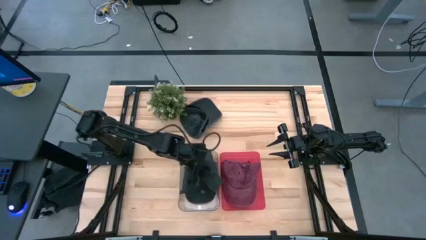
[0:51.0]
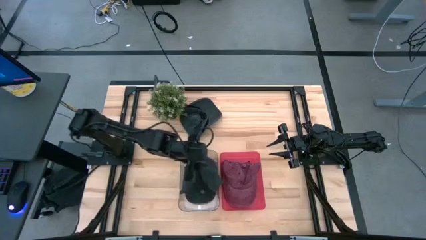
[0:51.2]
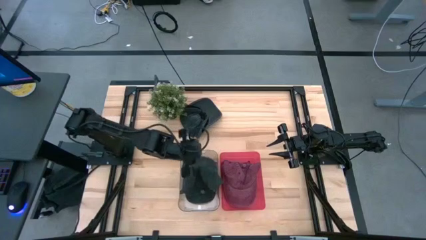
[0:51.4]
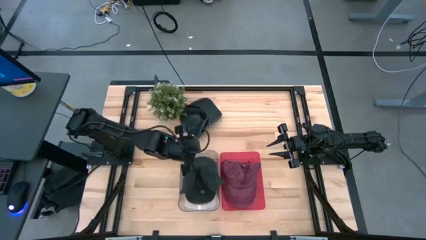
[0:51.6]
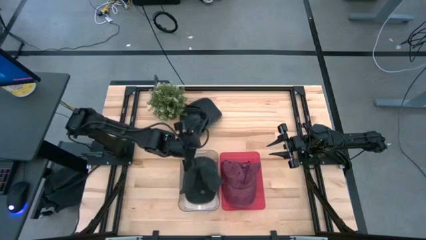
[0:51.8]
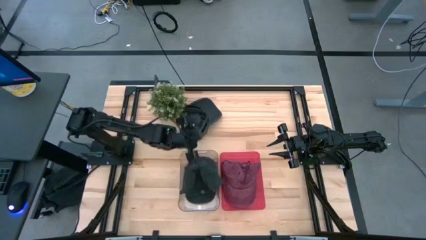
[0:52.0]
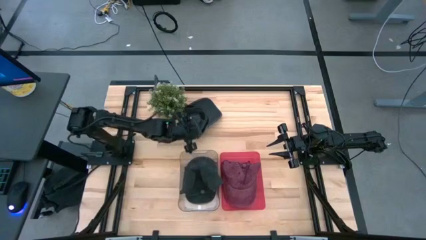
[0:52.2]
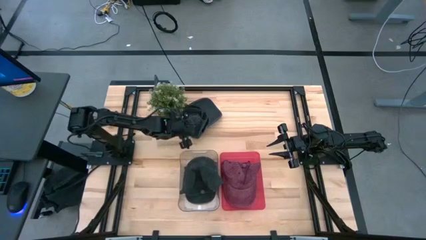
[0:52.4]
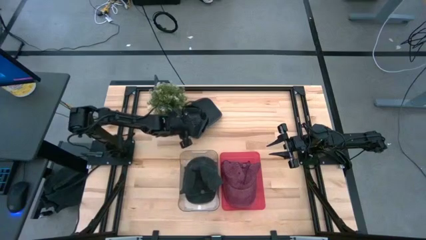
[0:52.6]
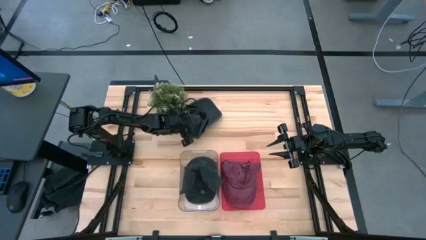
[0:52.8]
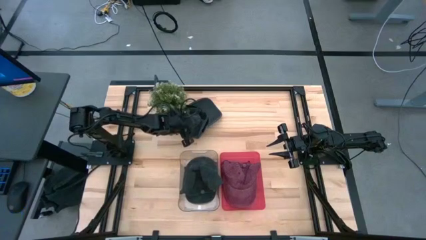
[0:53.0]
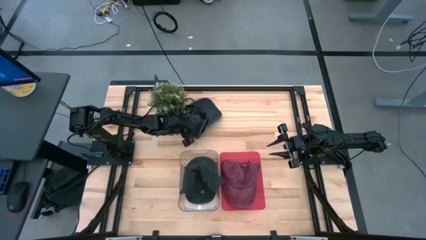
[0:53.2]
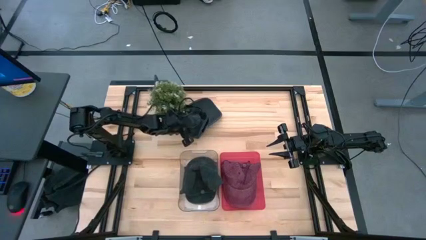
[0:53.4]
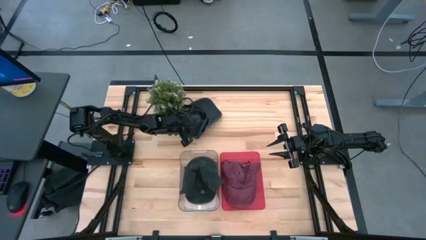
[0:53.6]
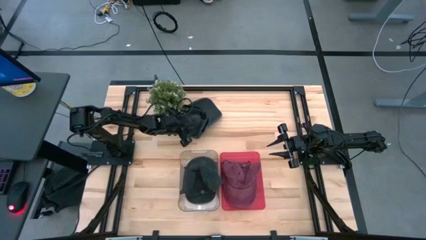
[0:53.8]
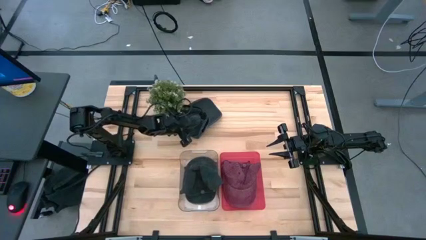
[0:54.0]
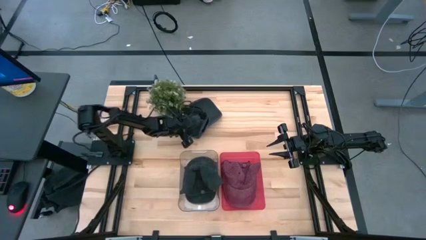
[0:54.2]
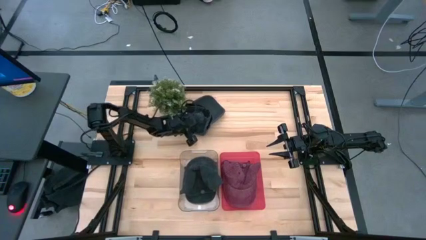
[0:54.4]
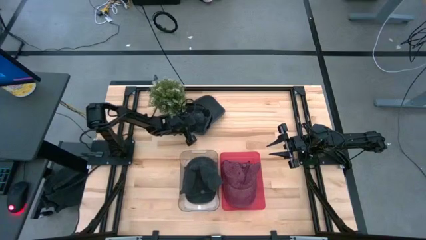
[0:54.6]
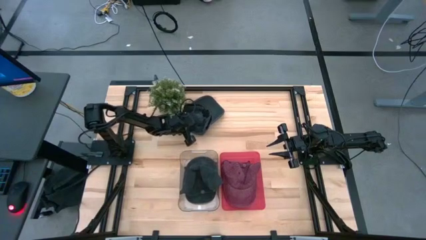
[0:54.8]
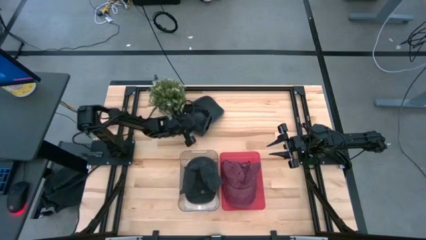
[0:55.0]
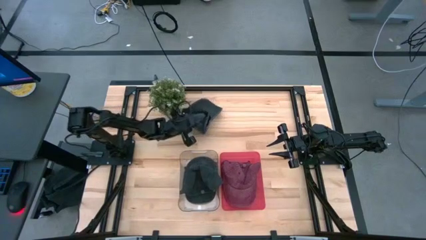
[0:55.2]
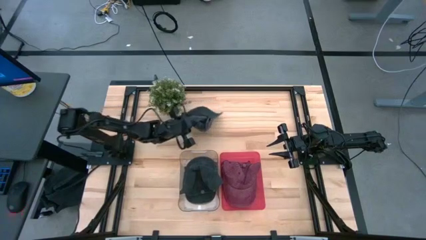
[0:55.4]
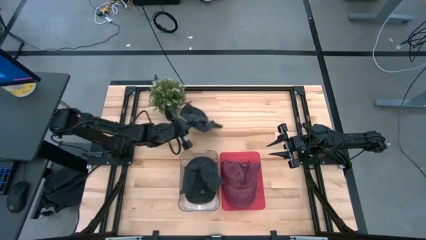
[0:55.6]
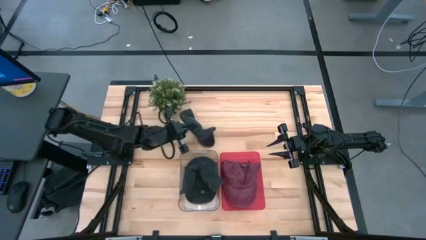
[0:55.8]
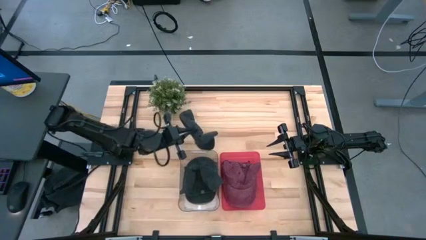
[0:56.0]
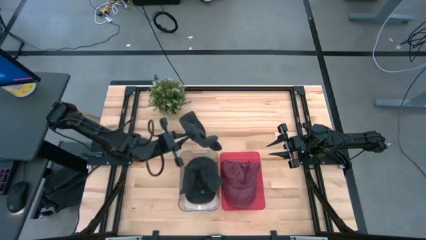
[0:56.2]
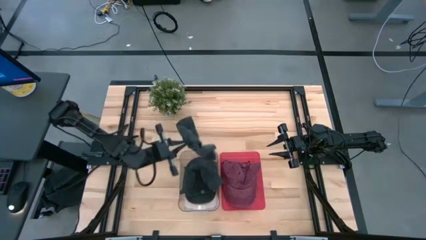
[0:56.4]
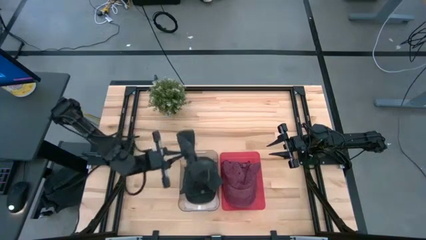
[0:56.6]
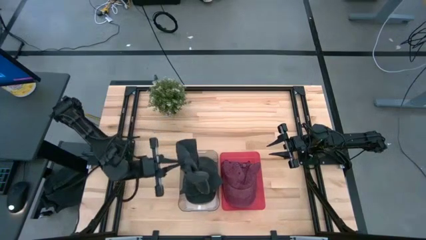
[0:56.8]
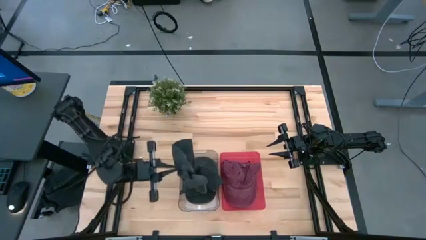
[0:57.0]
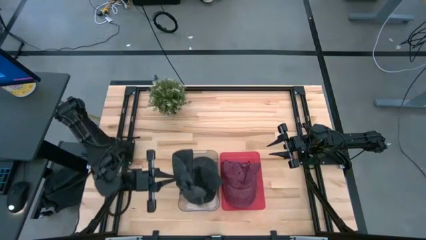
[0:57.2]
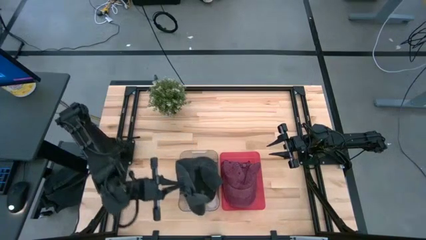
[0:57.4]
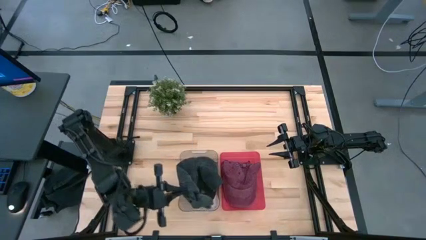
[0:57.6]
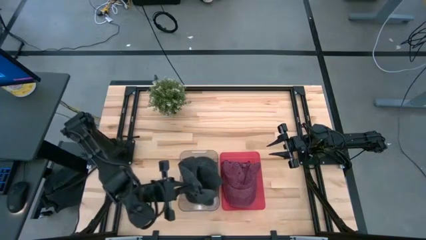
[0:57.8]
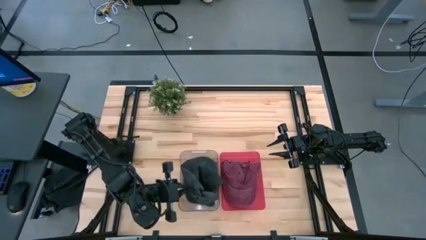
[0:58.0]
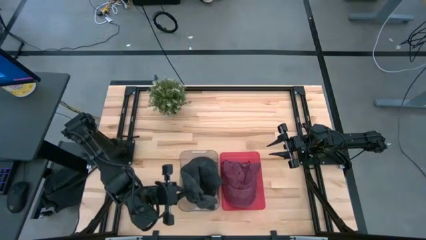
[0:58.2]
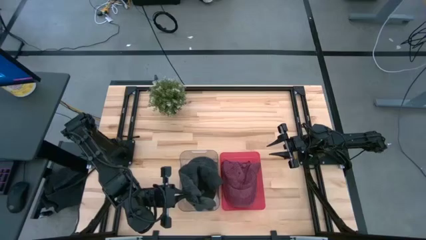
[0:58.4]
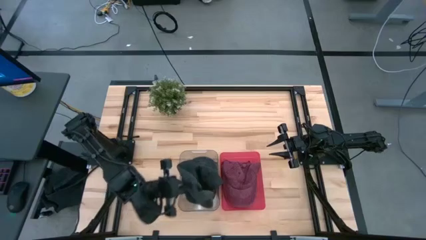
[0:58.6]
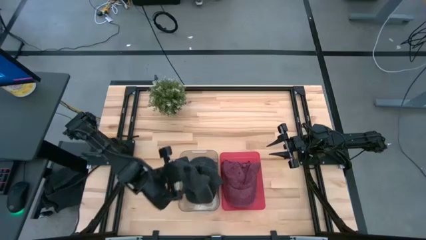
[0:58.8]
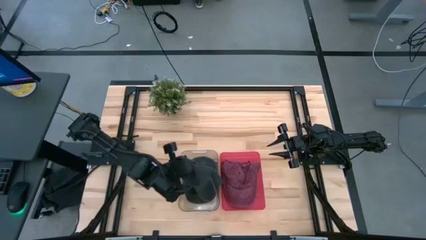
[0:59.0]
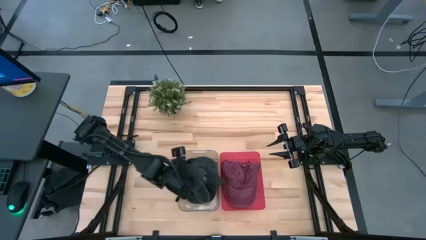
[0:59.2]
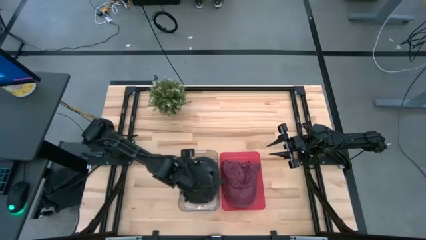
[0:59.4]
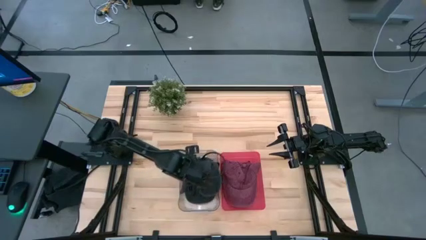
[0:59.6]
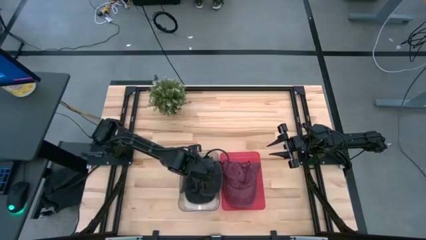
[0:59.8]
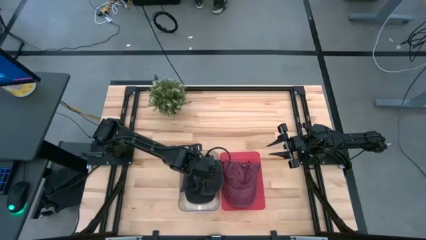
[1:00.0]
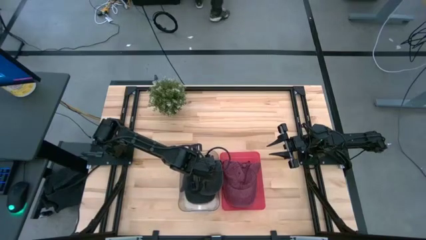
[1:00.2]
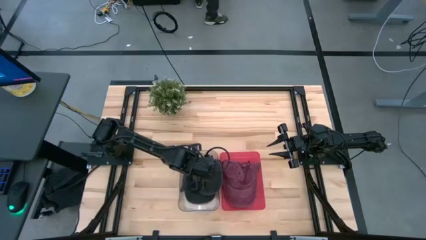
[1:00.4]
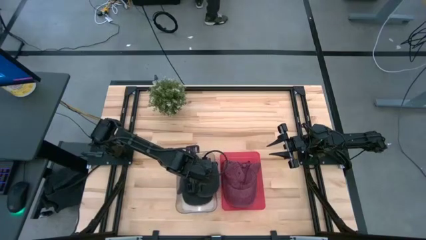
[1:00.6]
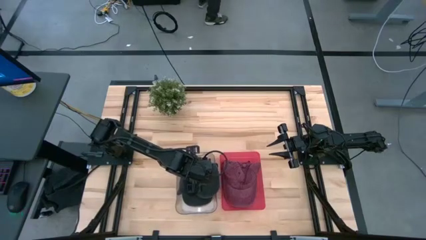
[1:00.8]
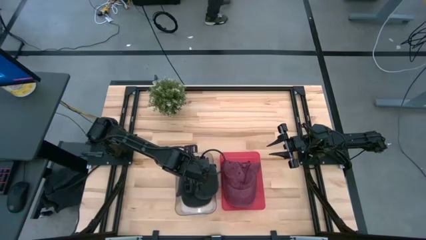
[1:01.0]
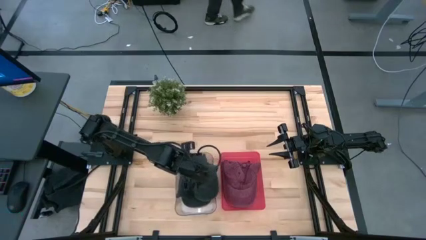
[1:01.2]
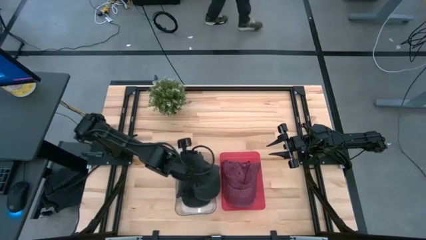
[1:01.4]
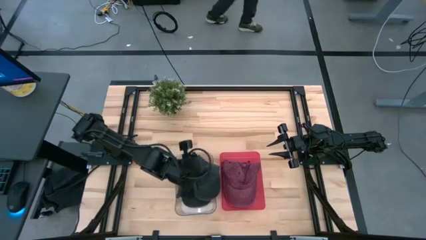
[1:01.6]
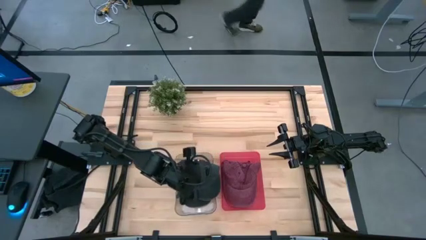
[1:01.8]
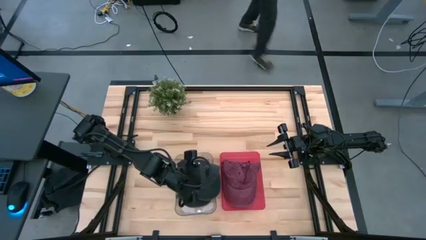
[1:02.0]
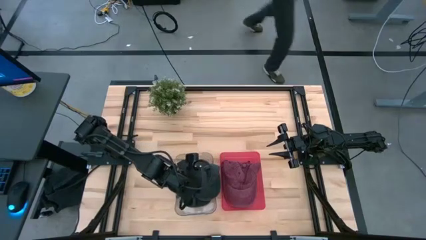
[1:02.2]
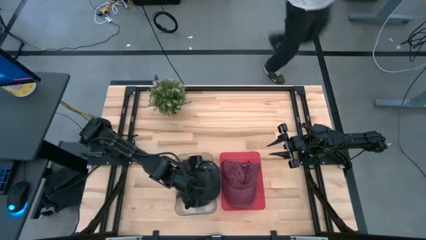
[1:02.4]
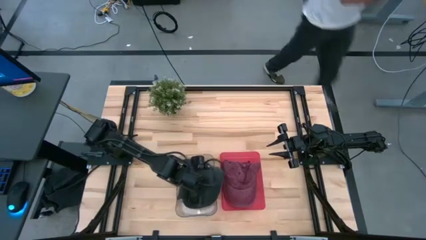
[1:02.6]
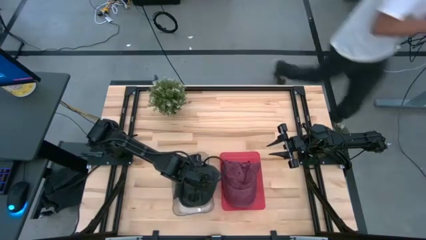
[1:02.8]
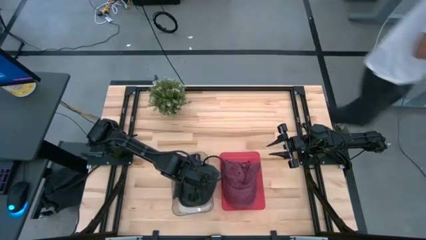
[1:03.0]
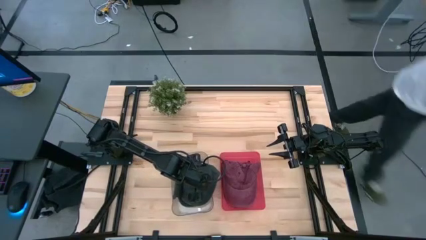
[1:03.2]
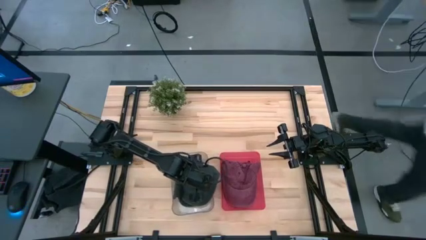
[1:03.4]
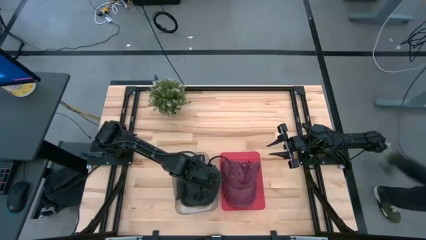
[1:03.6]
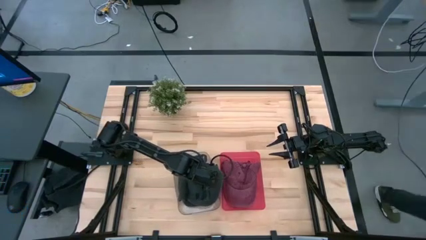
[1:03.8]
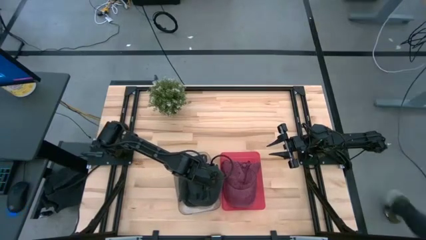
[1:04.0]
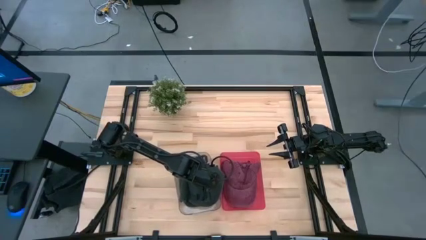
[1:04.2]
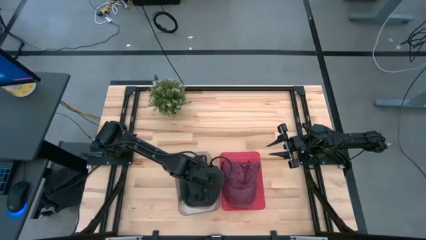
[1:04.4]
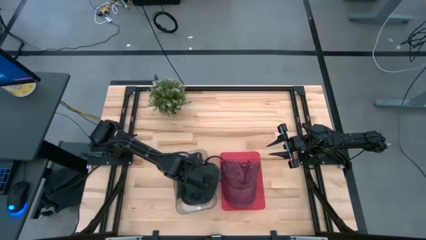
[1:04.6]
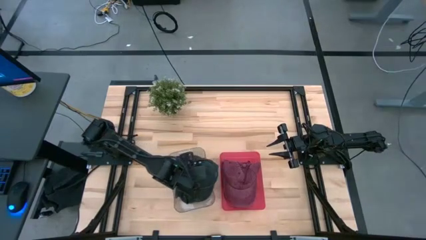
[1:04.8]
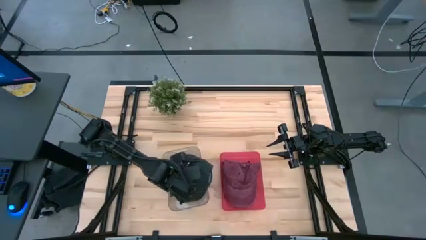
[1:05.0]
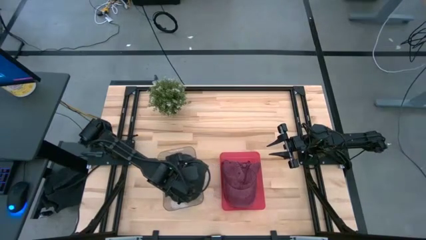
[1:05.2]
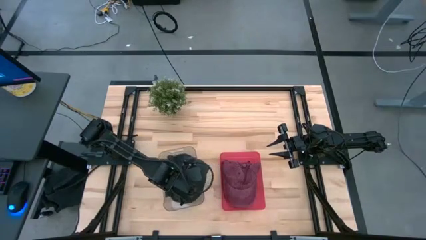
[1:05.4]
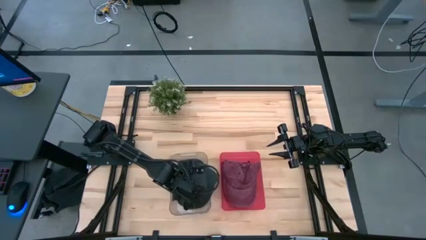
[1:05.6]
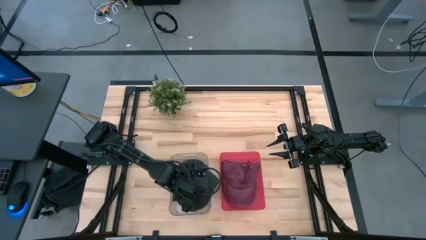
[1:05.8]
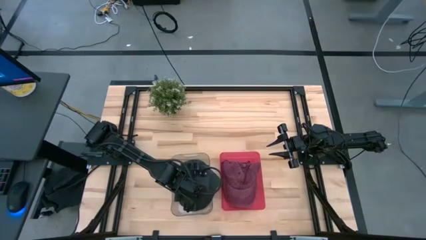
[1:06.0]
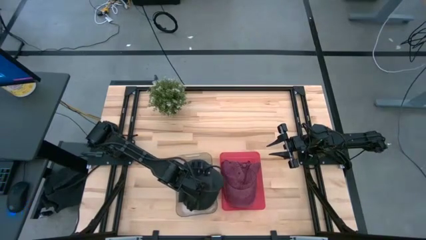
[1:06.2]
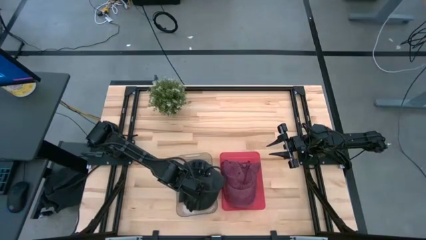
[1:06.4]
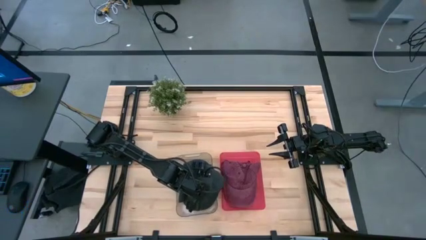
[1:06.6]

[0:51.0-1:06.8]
Task: Pick & Place hat
Put the black cap into the transparent bin
